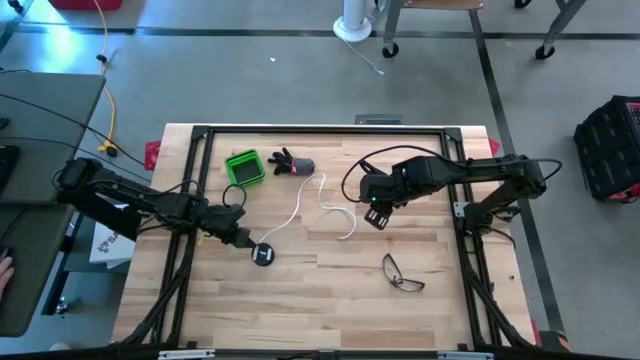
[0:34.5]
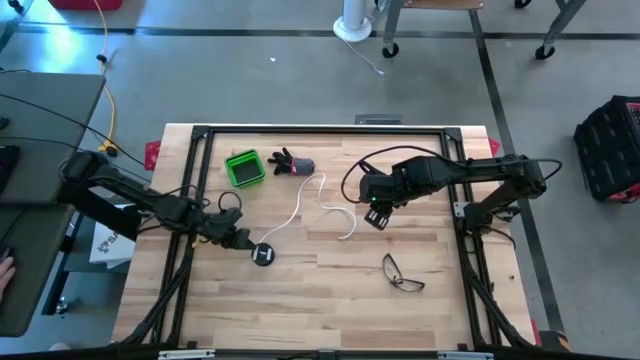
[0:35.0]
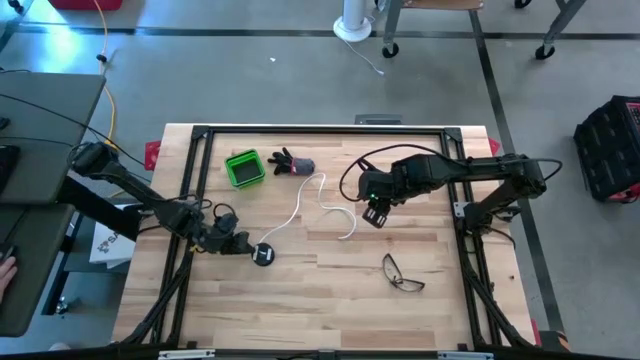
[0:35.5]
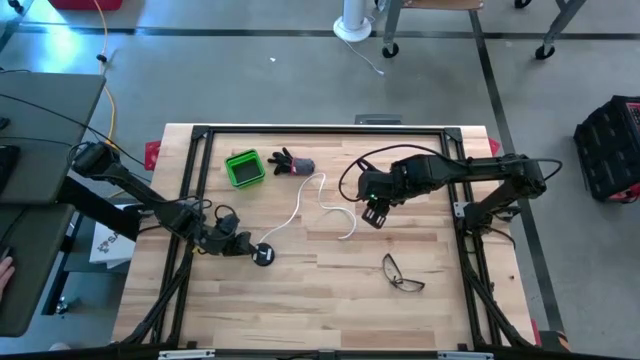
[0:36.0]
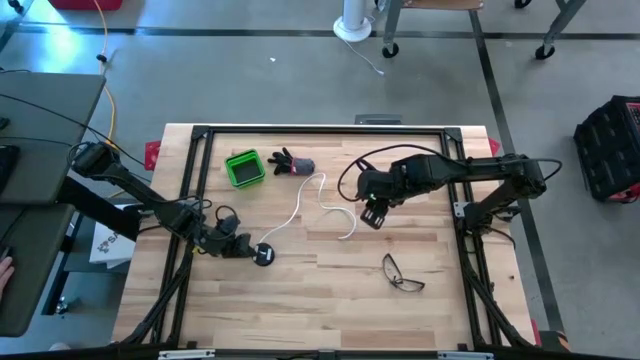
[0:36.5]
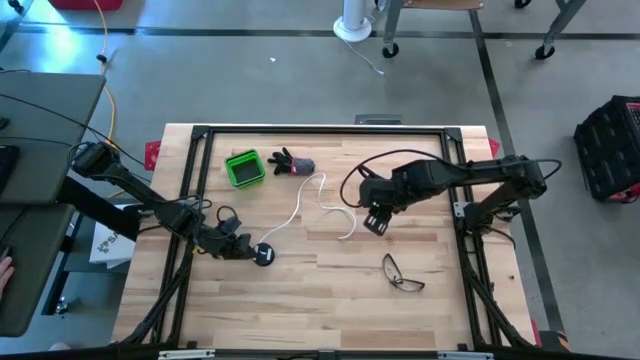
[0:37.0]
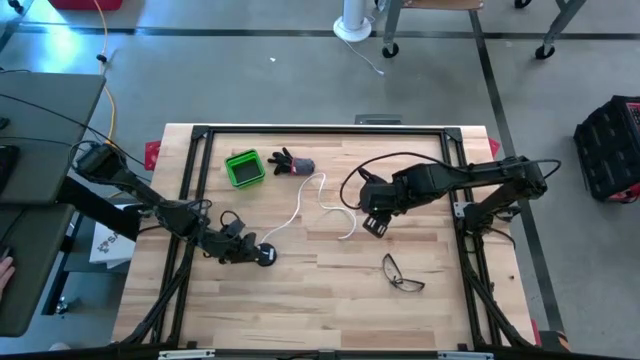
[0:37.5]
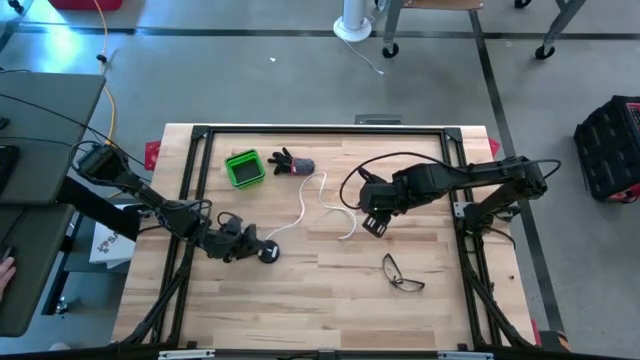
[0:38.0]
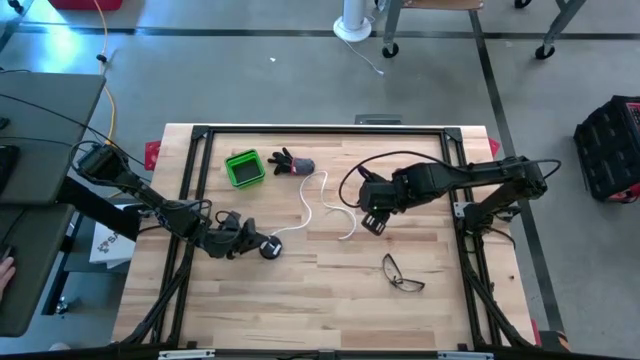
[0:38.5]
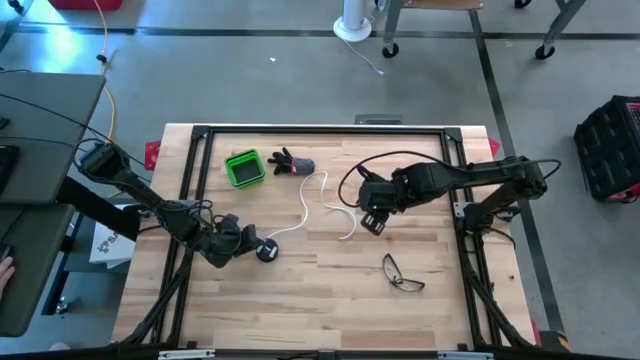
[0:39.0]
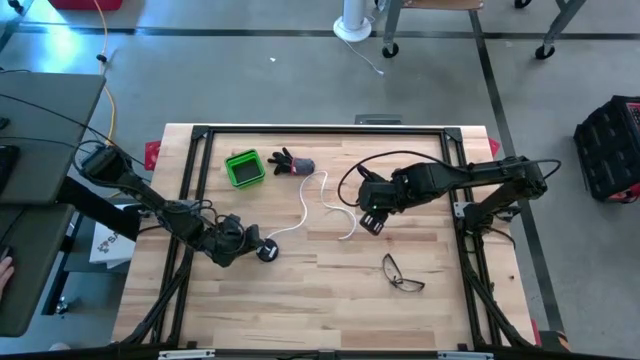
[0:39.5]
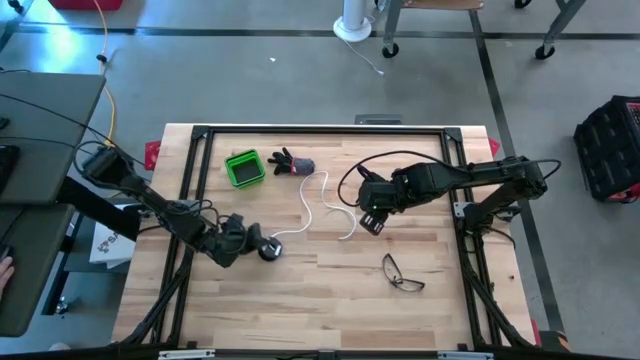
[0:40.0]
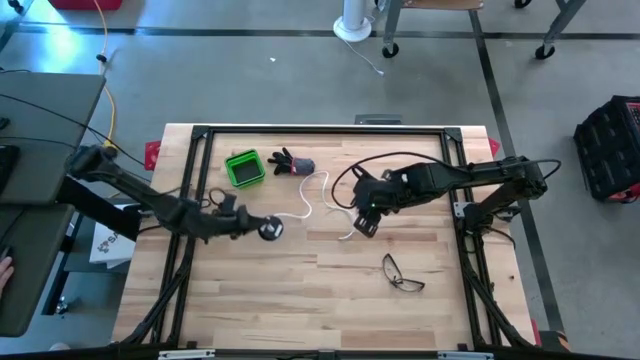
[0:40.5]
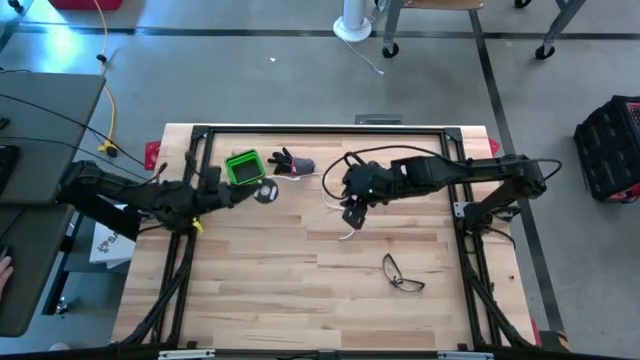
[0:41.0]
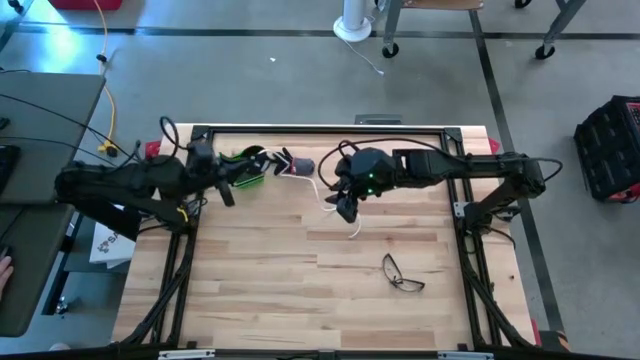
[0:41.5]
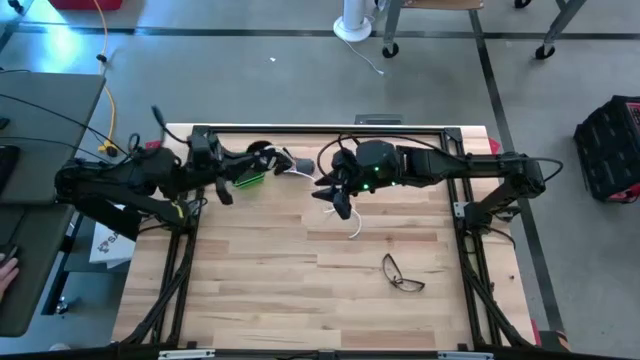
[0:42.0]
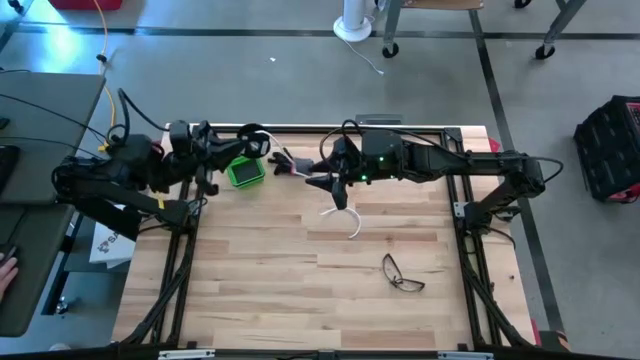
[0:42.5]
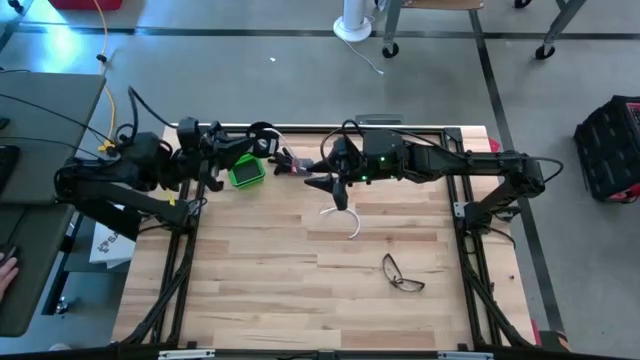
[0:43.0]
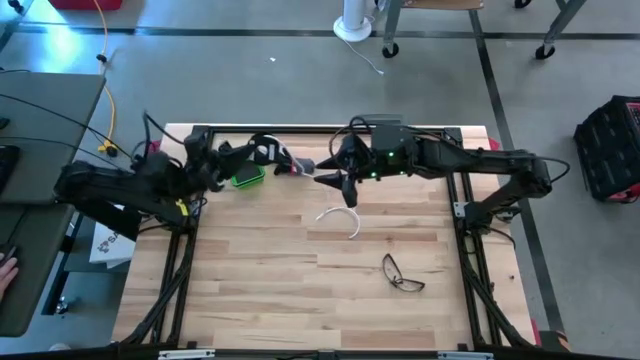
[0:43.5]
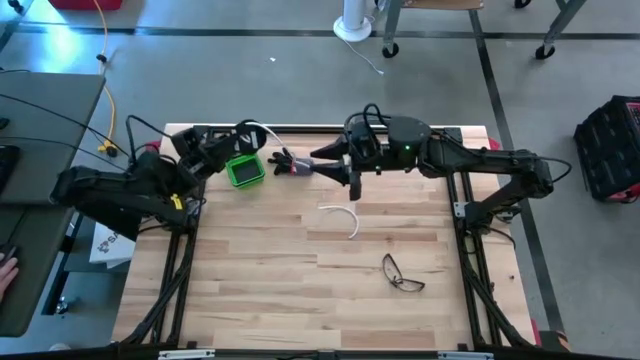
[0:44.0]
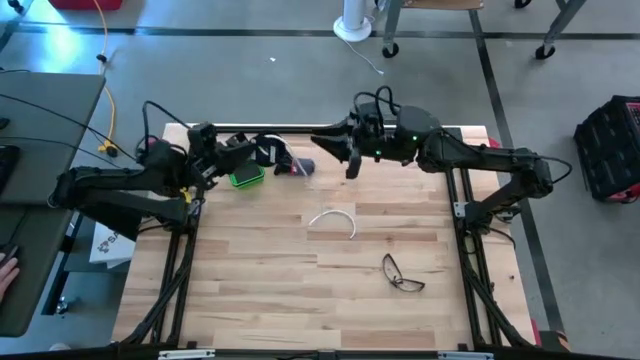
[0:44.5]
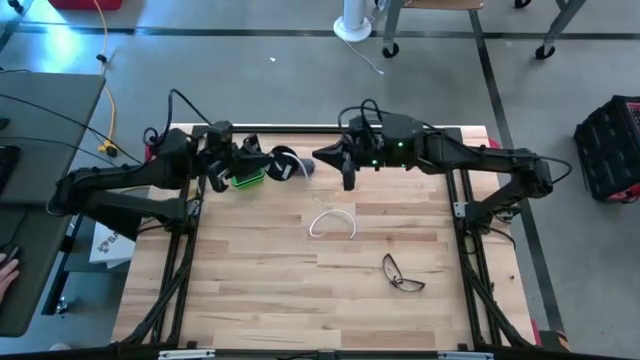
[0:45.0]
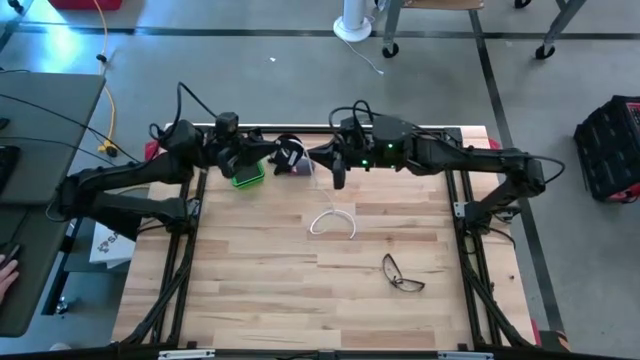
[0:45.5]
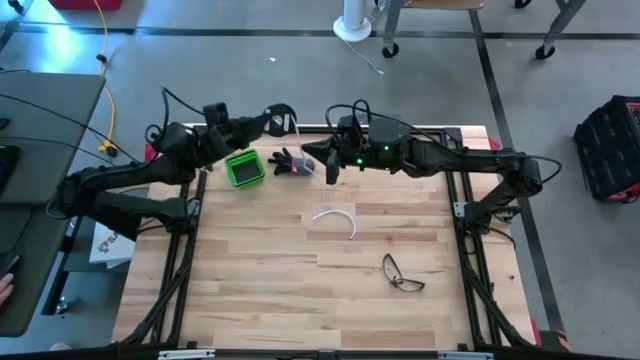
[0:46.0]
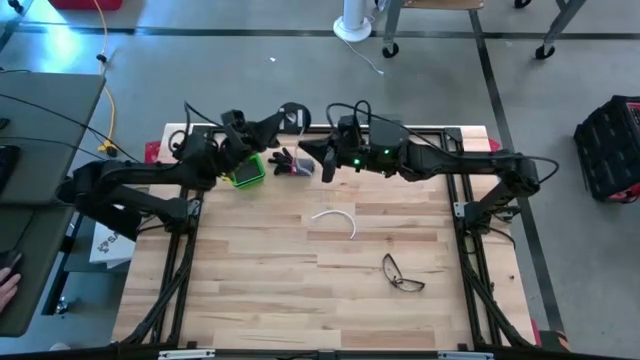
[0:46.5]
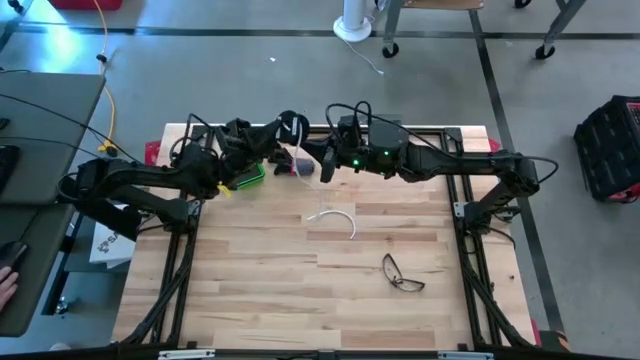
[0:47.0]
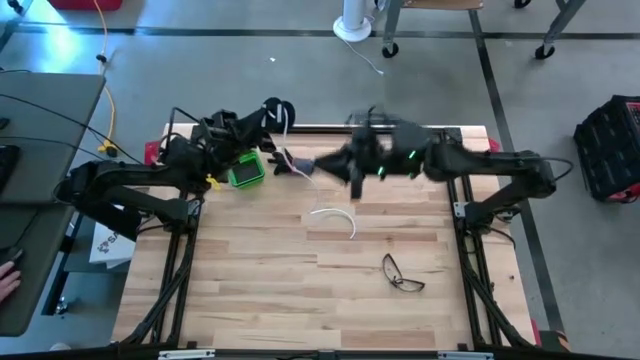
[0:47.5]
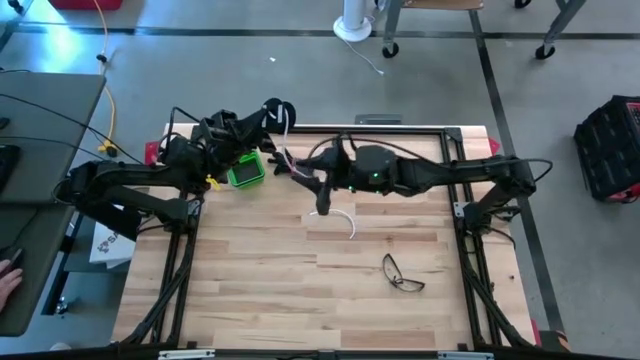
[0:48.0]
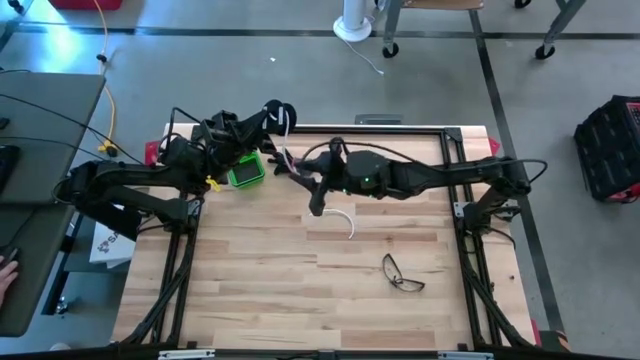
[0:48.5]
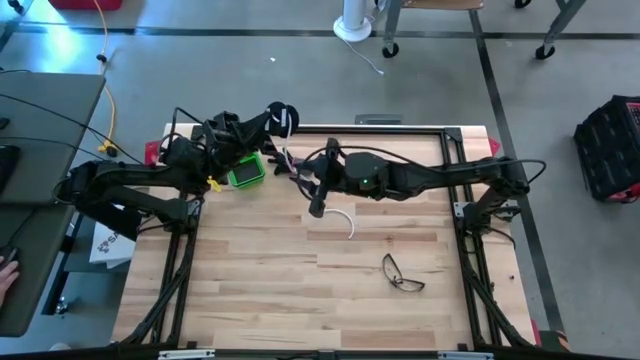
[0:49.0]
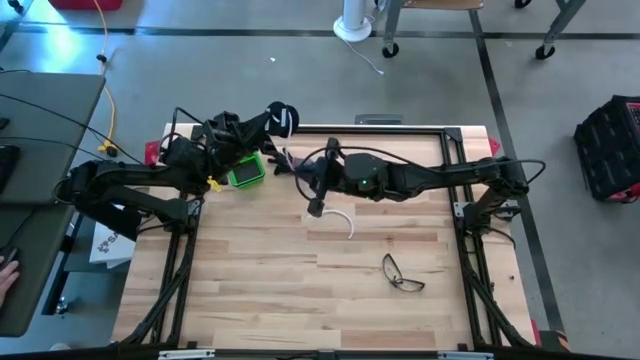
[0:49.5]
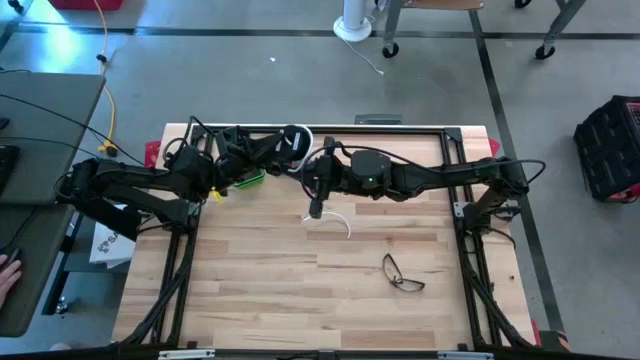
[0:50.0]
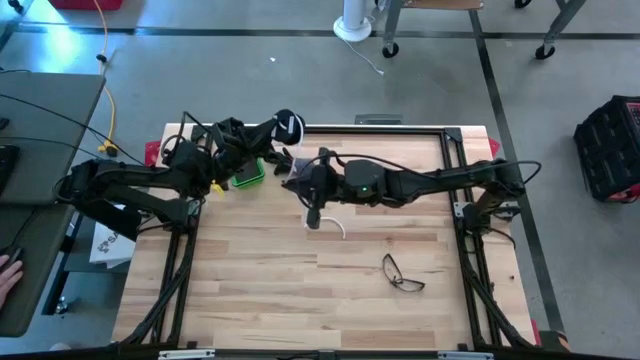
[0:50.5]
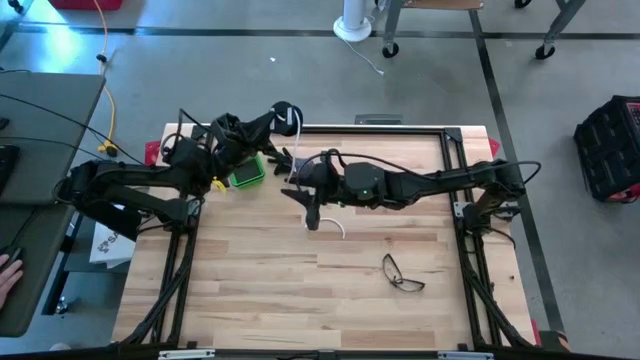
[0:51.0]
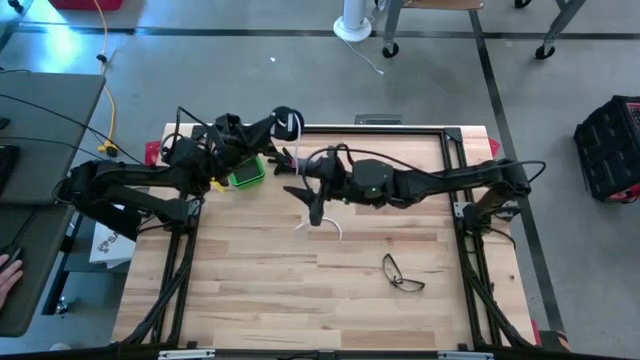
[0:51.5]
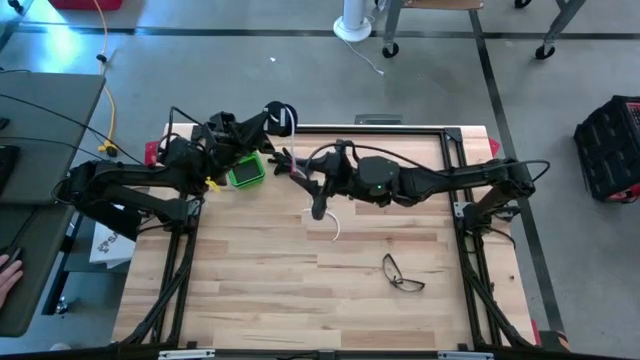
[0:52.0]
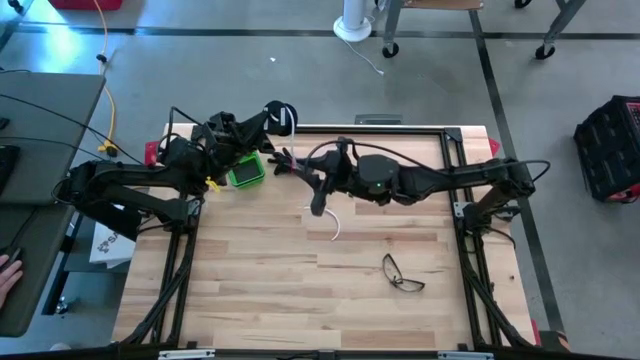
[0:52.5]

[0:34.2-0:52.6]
Task: Coil cords
Coil the white wire on the spool

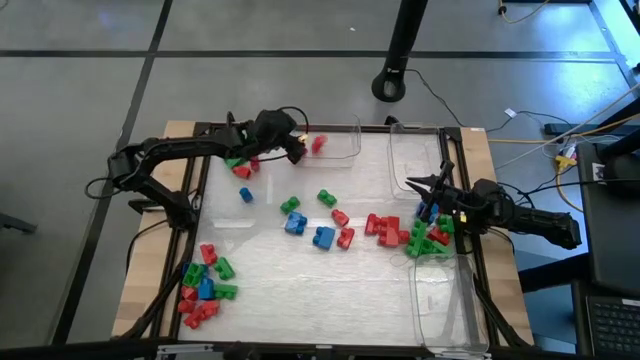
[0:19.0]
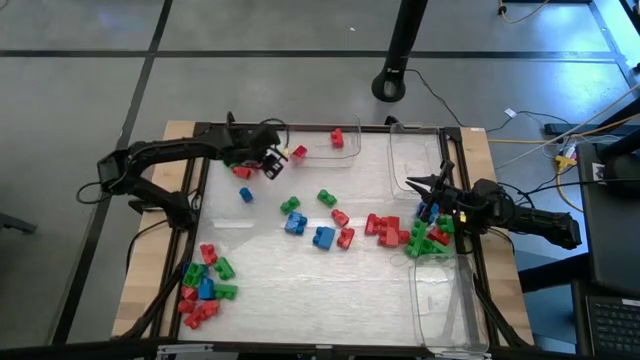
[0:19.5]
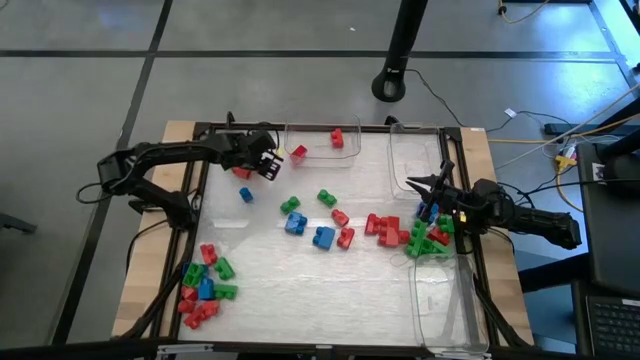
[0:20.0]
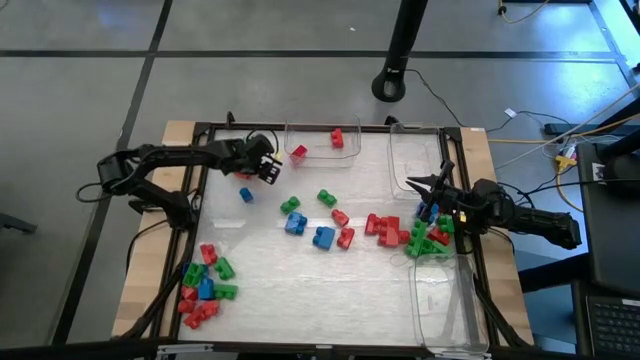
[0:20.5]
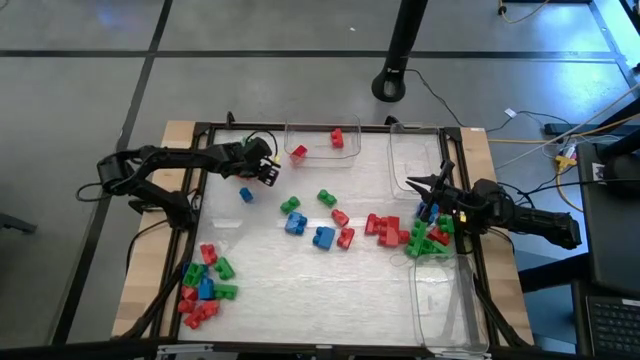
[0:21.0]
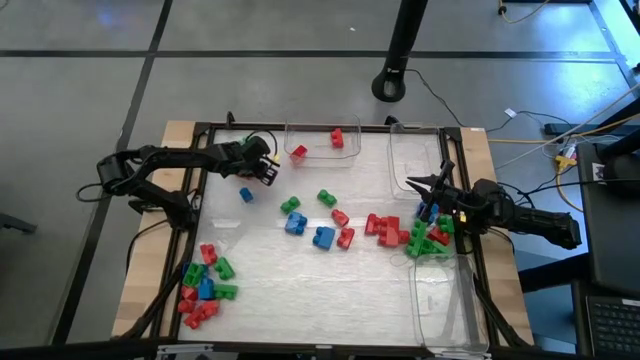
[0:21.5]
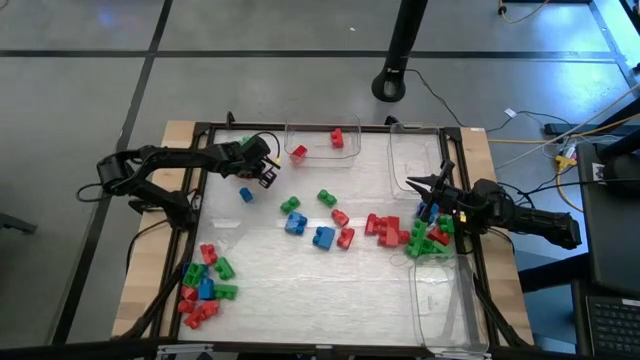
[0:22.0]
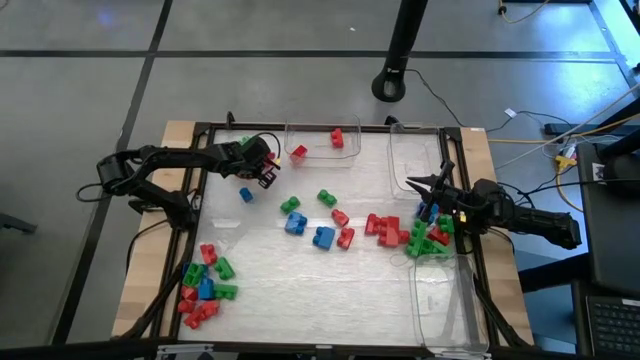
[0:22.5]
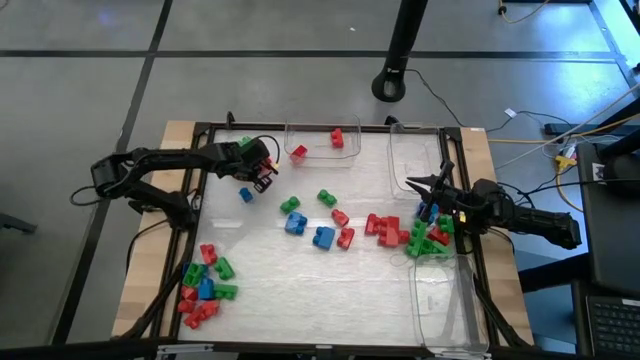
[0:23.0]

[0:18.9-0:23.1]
Task: Sort blocks
Put the red game piece into the top left transparent bin
